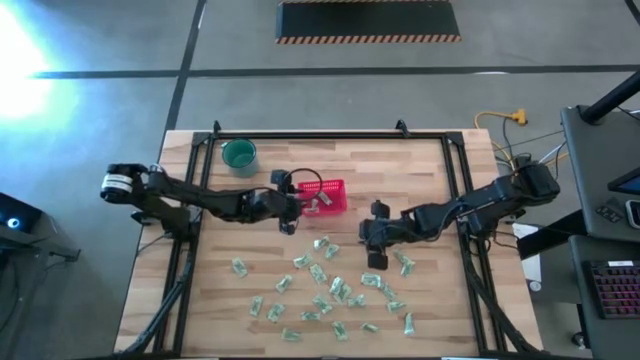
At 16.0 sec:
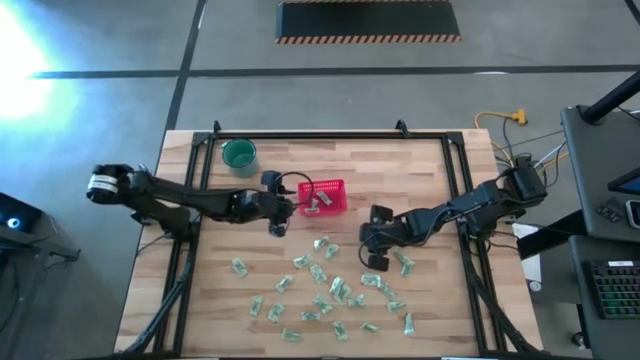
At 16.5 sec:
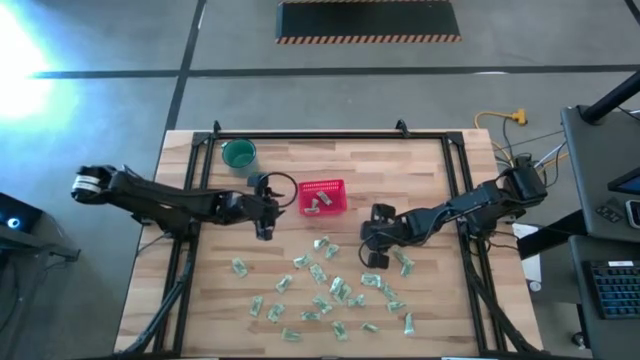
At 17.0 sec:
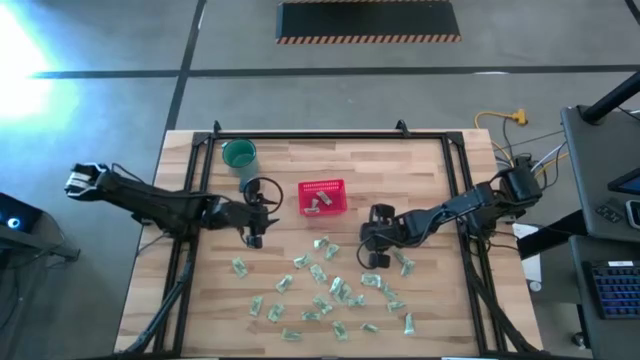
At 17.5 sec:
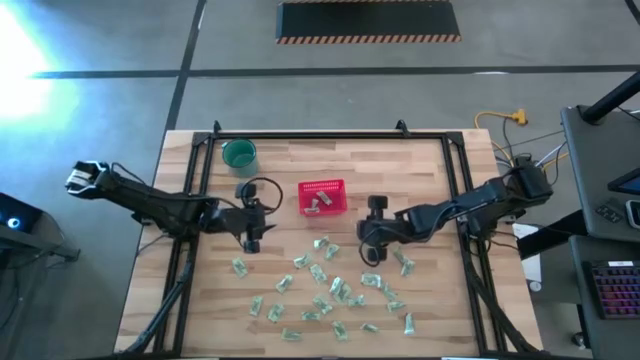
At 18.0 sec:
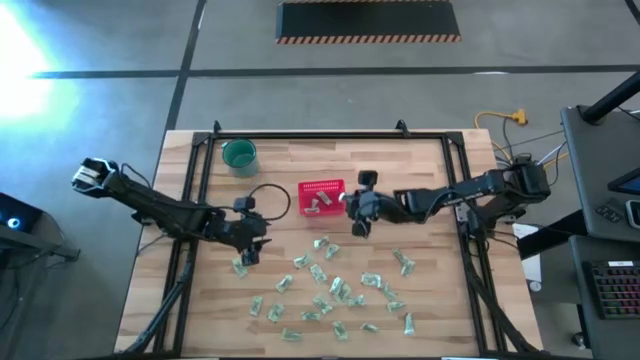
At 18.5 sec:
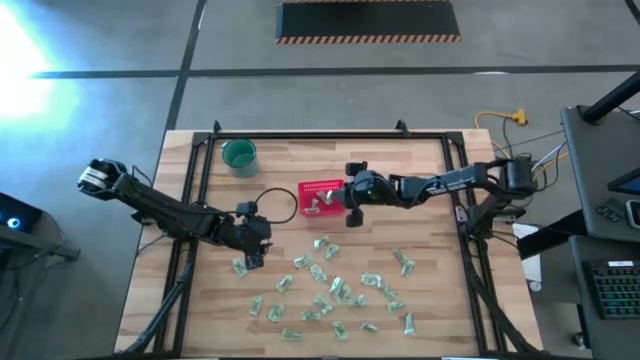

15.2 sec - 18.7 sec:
Task: Pick and place items into bin
Put the stevia packet into the red bin

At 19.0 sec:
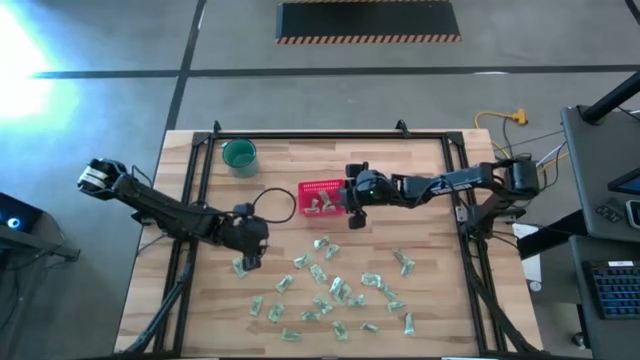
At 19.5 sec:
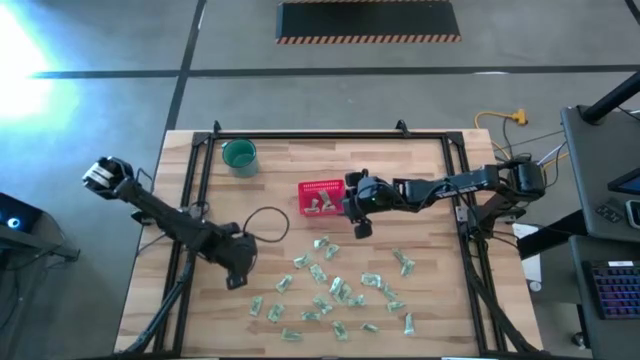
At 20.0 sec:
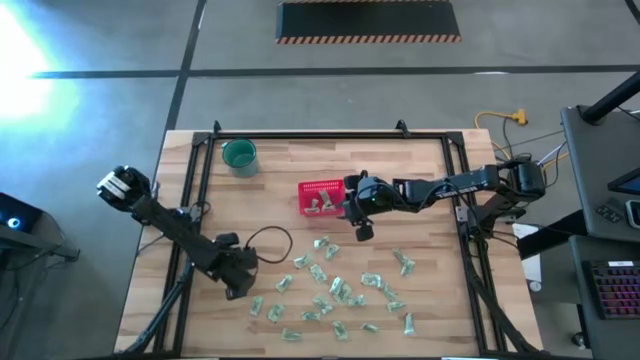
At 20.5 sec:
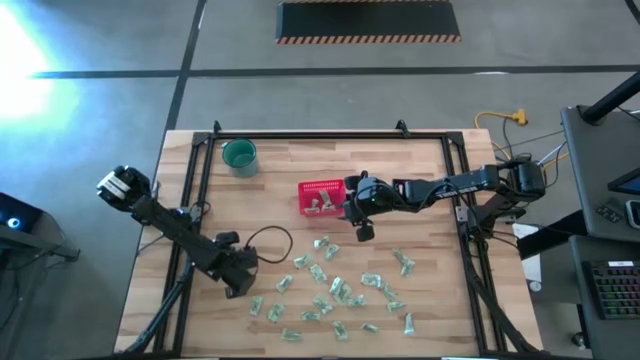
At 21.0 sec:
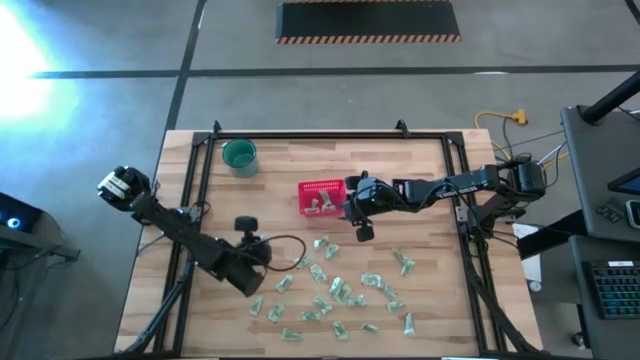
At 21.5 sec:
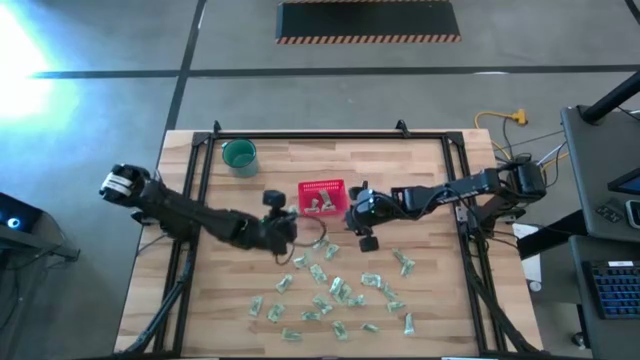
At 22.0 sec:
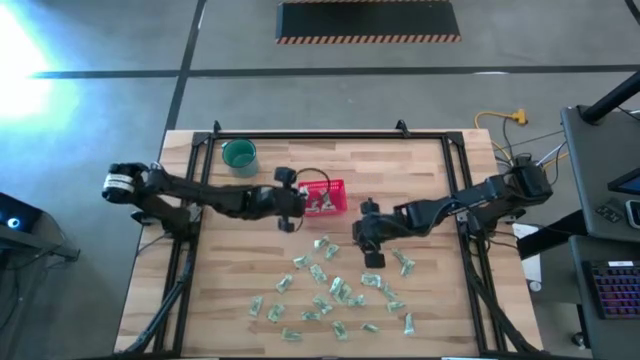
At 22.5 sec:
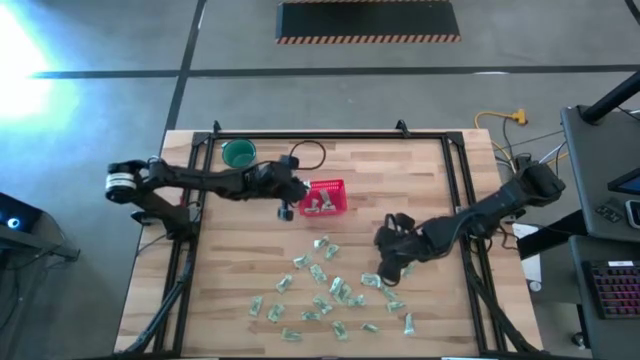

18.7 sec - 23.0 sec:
Put the stevia packet into the red bin

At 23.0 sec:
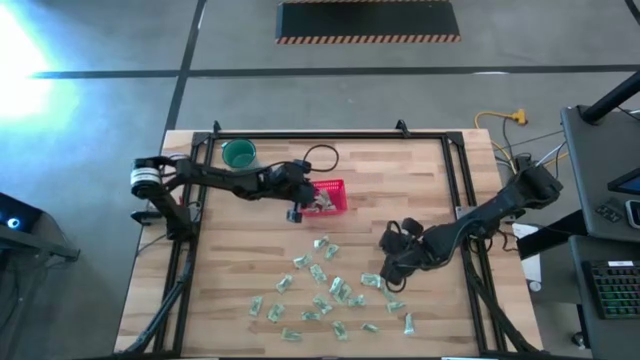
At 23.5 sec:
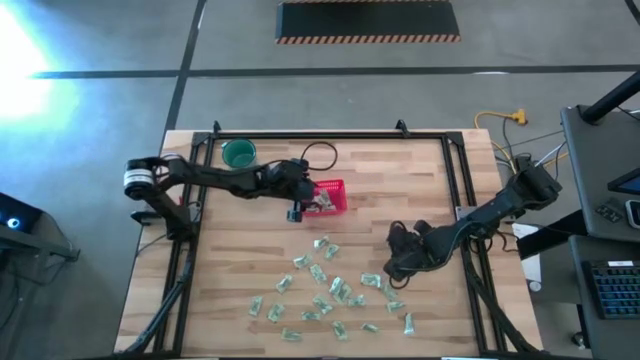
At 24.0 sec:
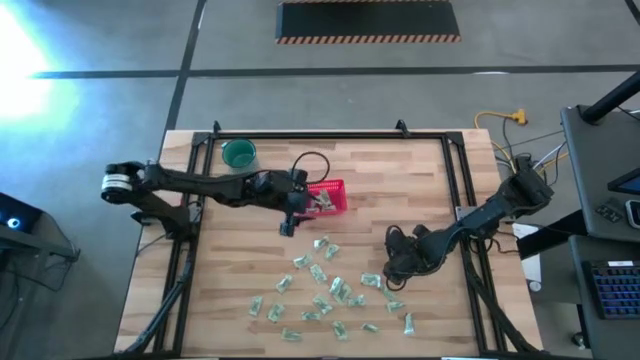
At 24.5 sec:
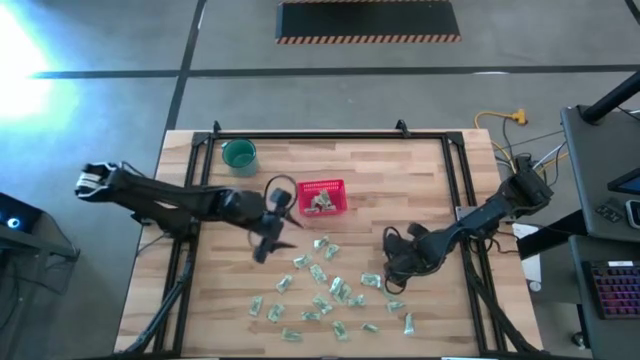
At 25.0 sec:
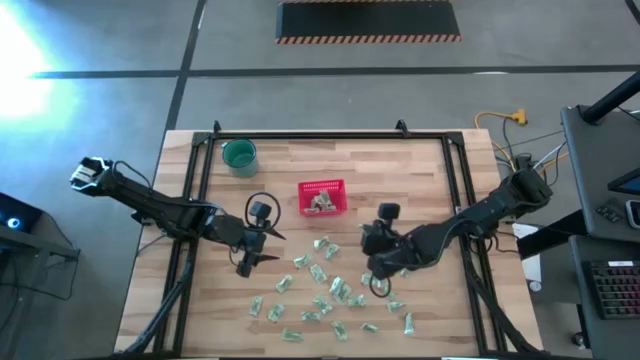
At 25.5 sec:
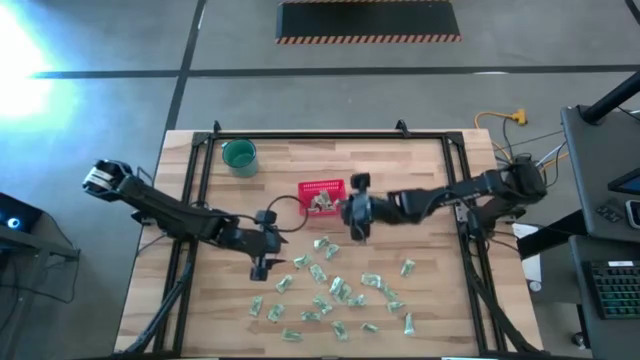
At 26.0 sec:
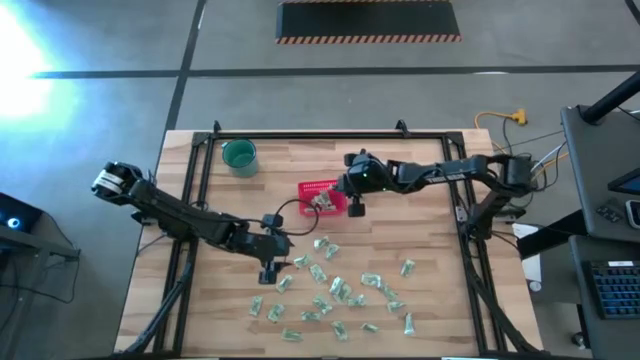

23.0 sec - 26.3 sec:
Put the stevia packet into the red bin

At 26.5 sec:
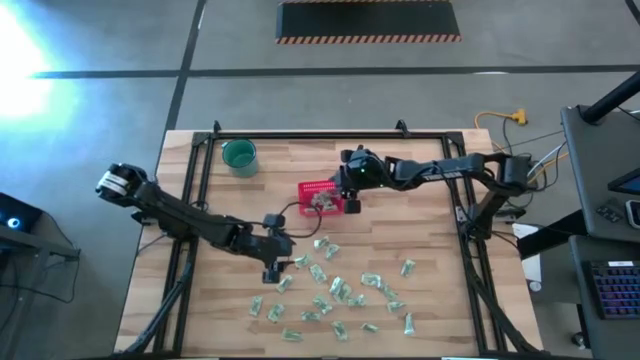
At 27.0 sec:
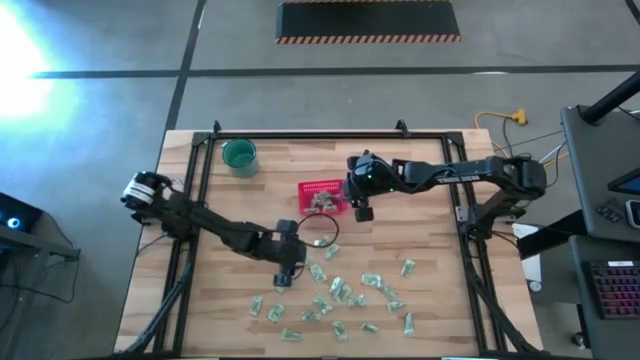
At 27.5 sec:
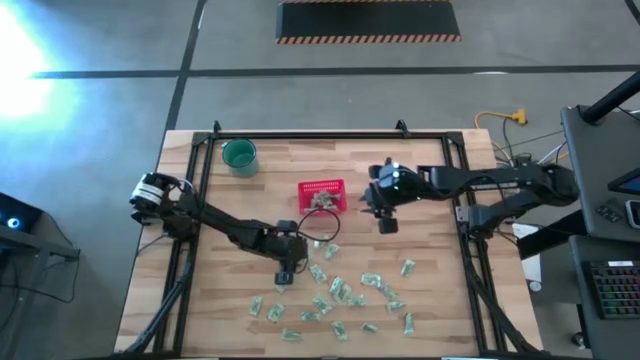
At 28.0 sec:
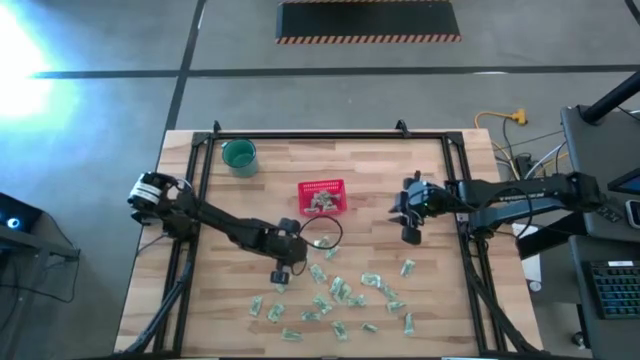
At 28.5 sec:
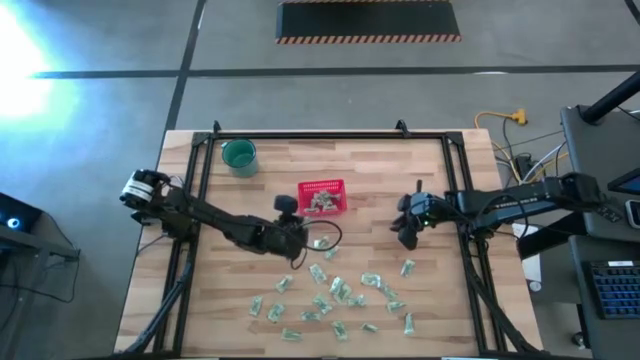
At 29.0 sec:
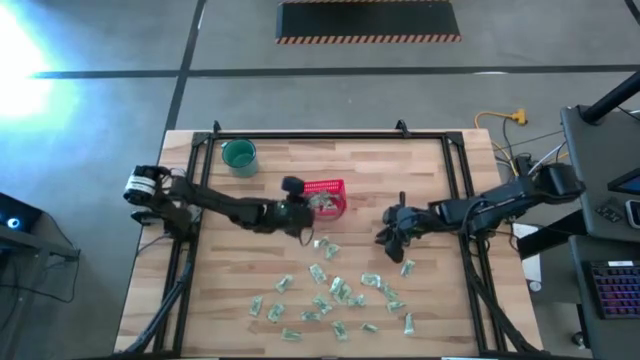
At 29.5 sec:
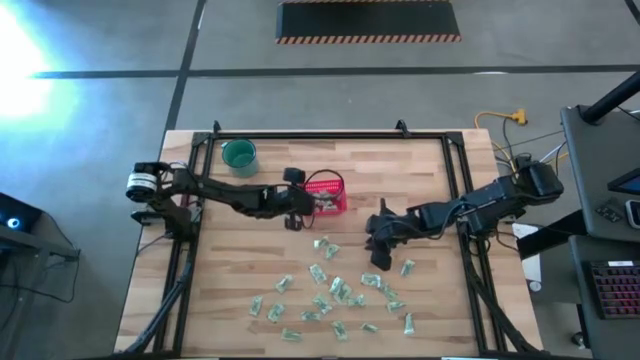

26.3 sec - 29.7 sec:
Put the stevia packet into the red bin

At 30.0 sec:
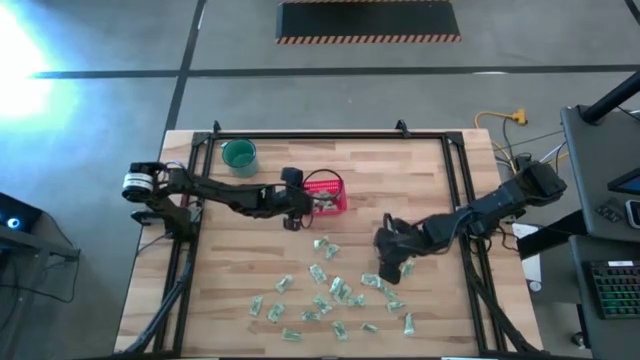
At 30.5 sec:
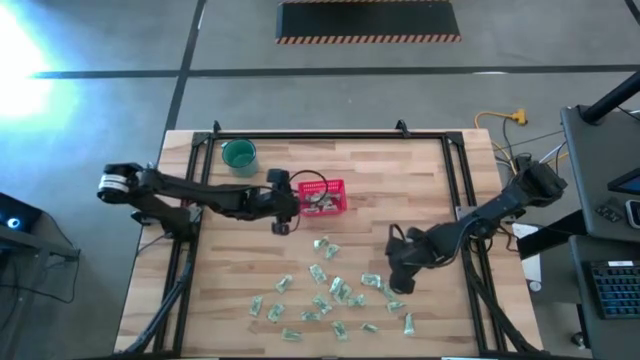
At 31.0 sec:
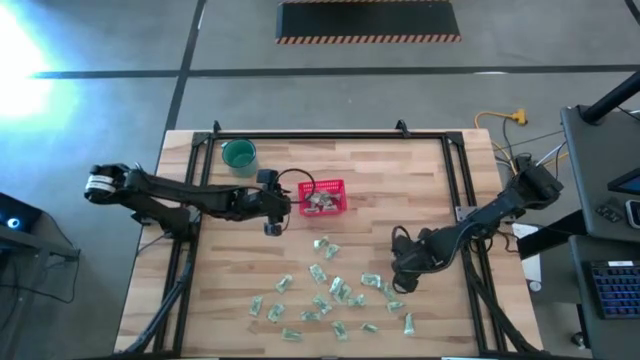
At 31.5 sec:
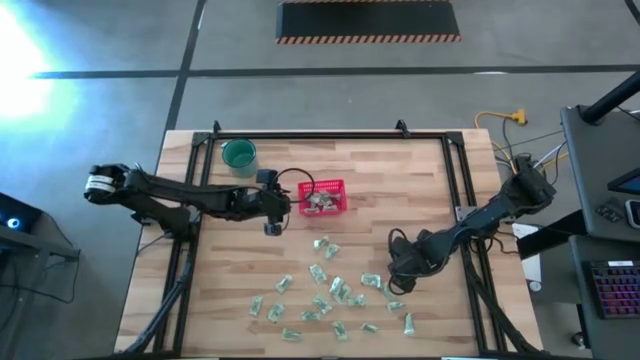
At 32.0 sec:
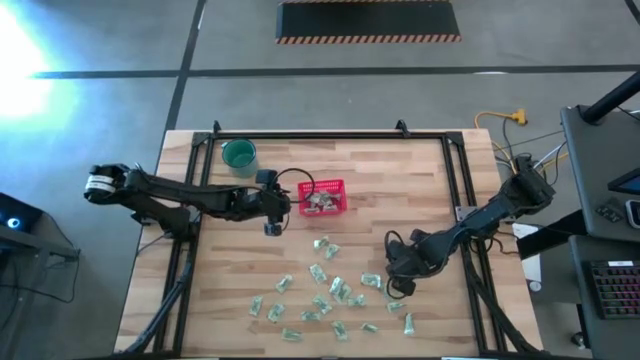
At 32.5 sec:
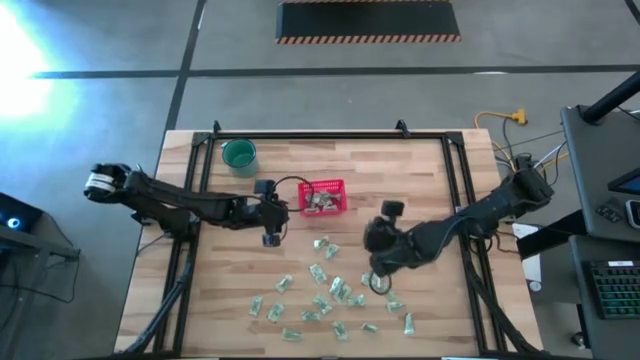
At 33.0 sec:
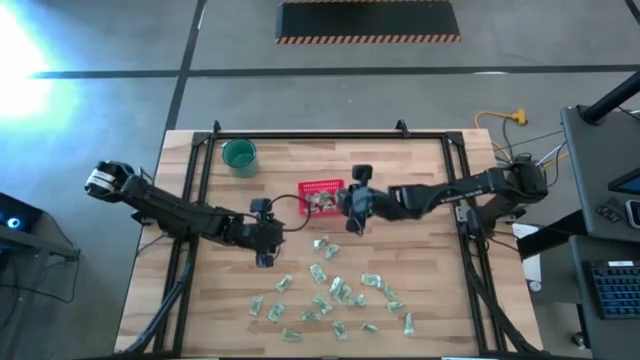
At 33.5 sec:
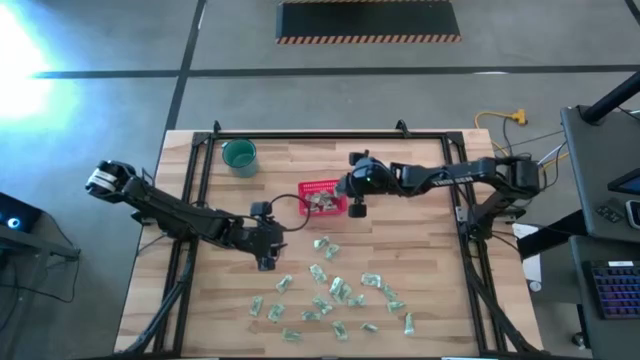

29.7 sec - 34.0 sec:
Put the stevia packet into the red bin

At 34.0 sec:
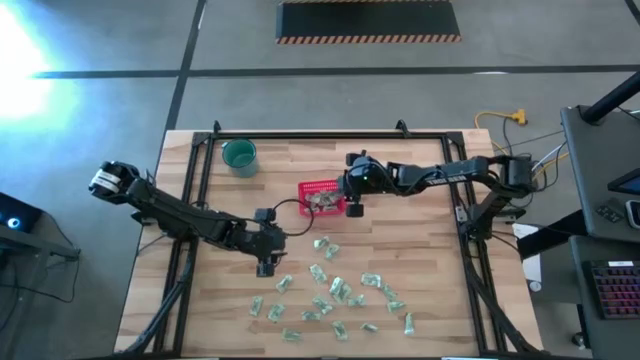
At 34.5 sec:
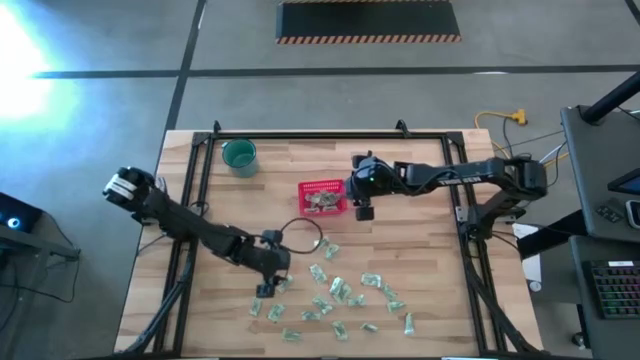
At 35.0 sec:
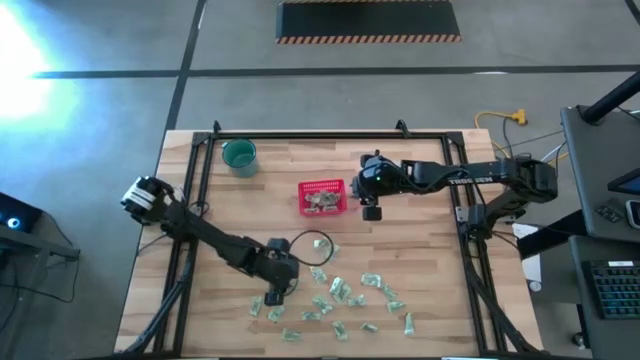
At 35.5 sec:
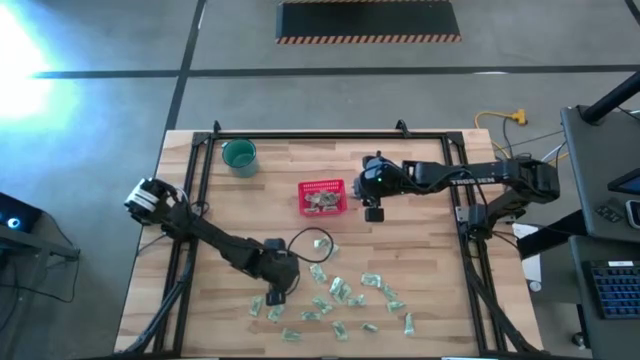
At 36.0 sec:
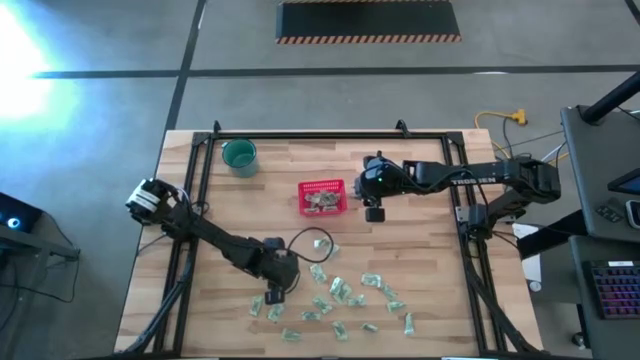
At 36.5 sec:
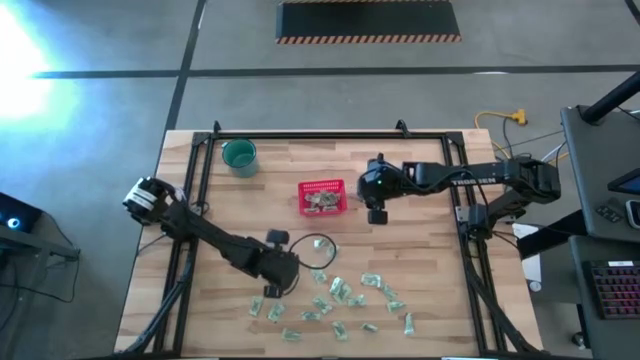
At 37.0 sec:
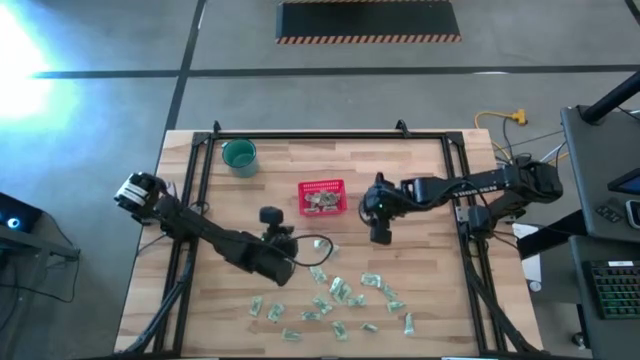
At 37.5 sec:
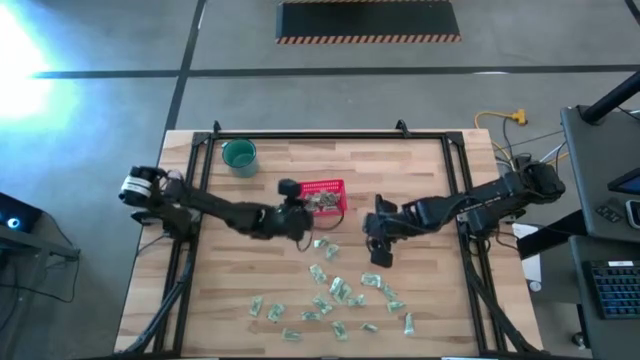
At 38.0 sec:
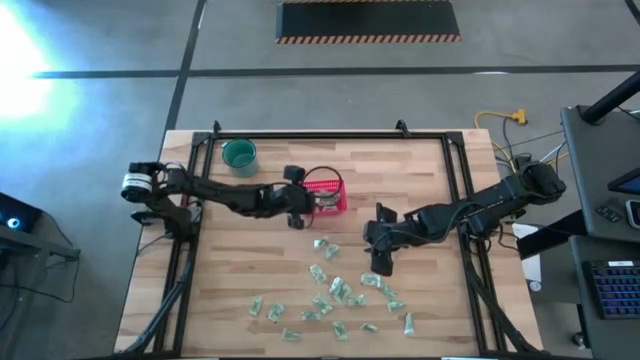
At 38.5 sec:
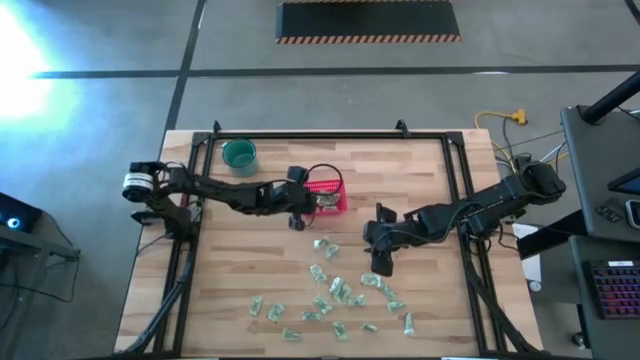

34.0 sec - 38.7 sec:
Put the stevia packet into the red bin
